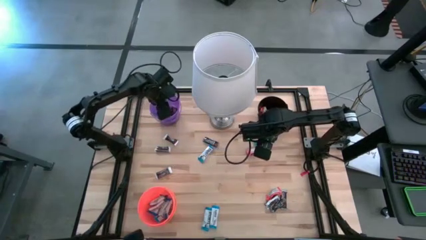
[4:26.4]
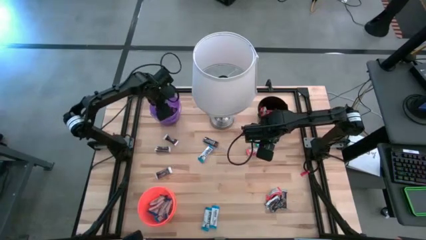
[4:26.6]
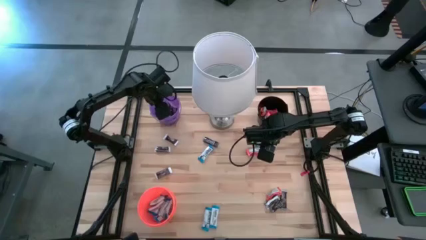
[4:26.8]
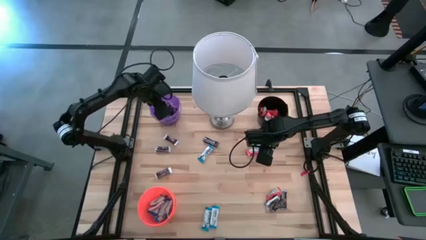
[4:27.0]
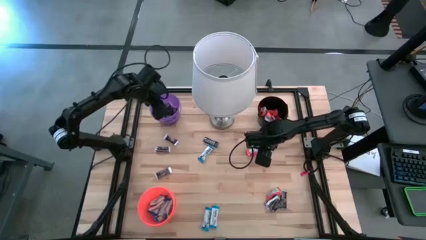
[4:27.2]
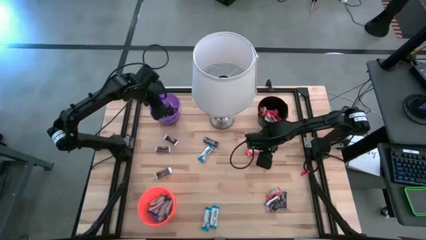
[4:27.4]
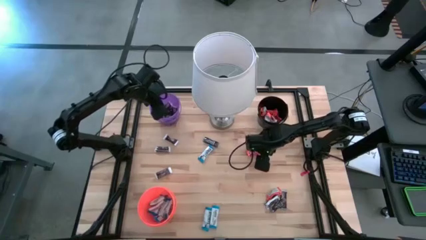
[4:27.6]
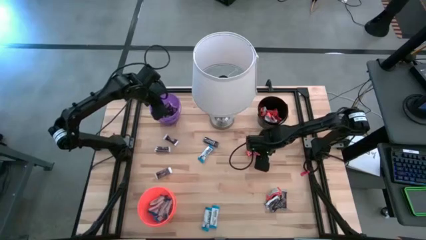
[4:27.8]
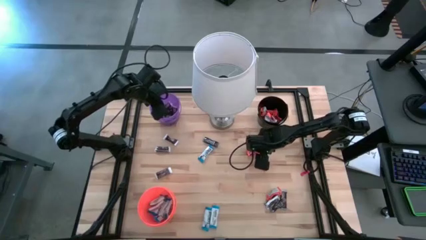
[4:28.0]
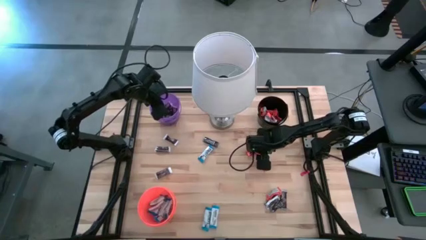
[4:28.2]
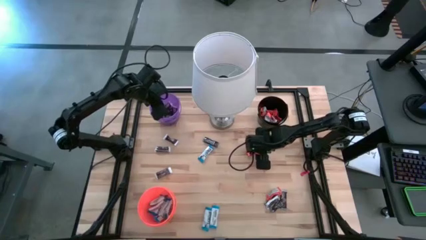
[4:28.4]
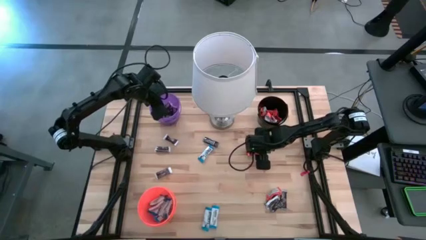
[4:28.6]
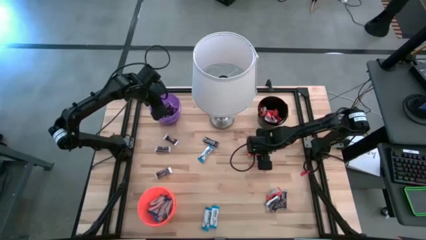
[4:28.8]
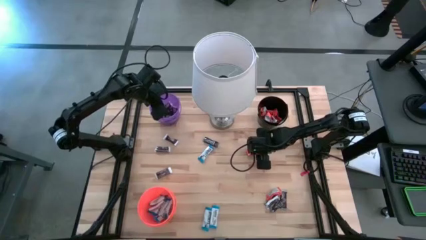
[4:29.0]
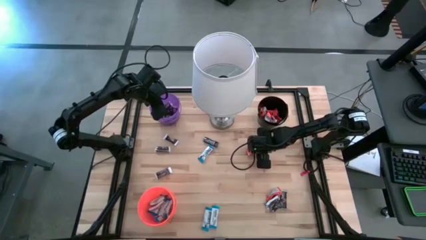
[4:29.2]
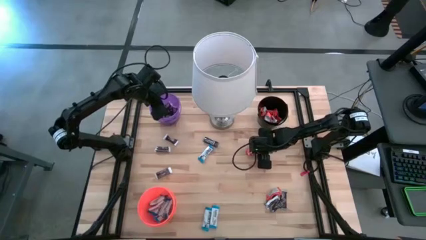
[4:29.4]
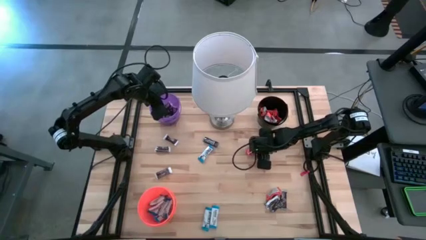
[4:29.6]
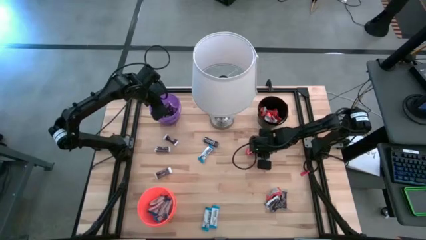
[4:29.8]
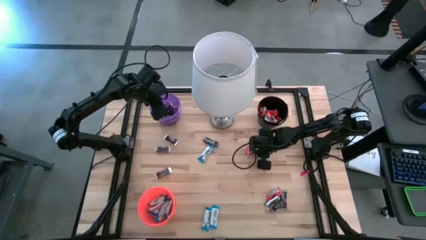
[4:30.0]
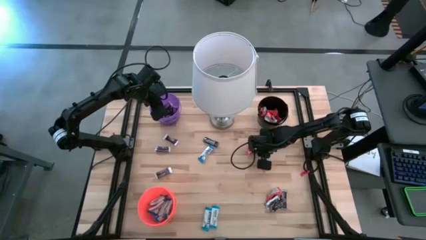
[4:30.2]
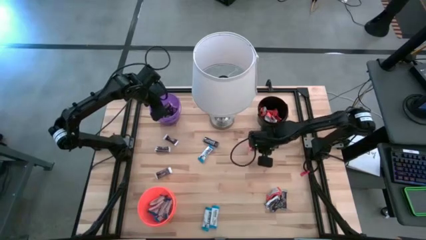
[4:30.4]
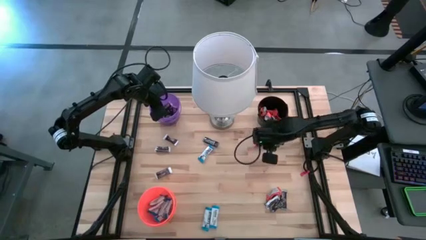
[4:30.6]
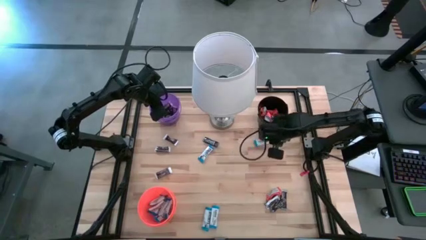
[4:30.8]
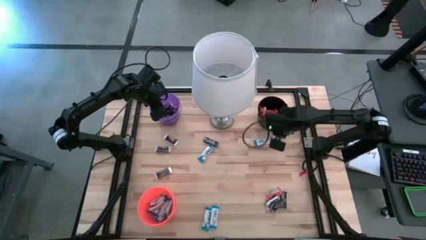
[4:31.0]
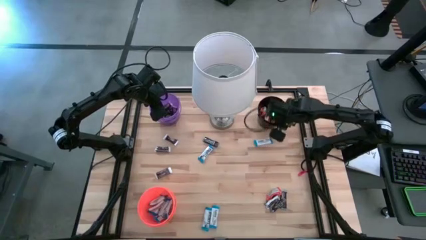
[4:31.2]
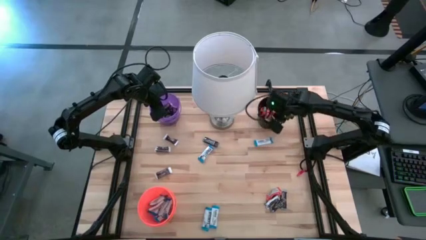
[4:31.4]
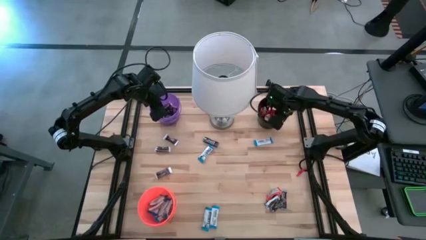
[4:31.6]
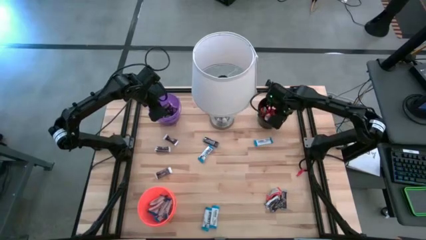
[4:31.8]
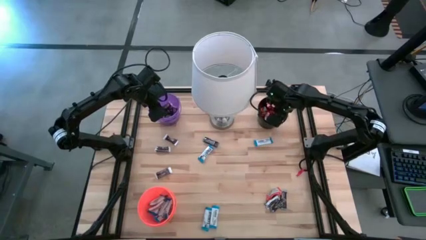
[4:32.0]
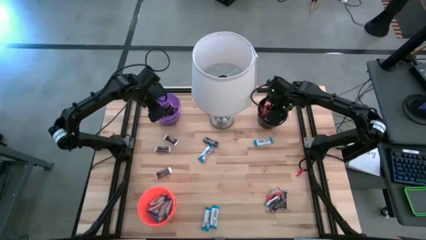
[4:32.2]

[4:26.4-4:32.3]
Task: Organize candy in baskets
Put the orange chocolate bar into the black bucket

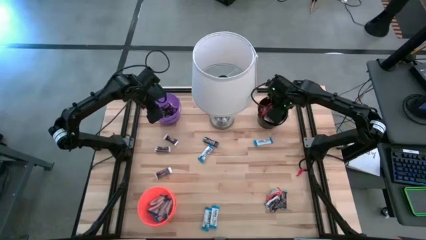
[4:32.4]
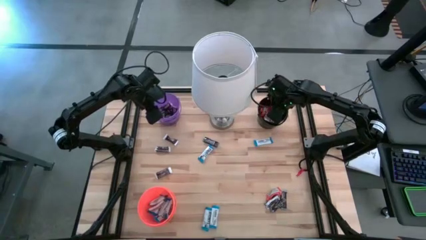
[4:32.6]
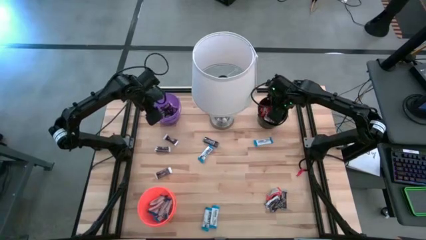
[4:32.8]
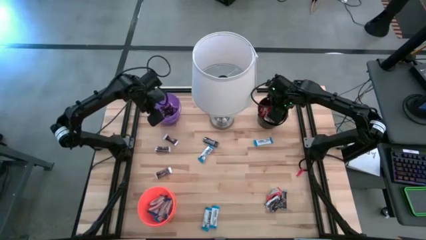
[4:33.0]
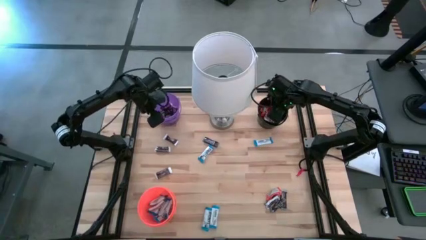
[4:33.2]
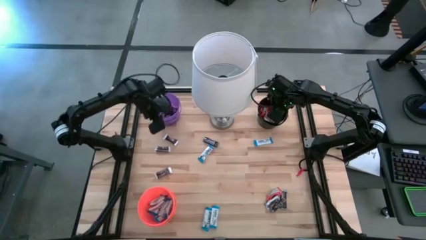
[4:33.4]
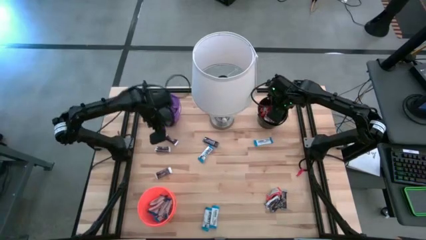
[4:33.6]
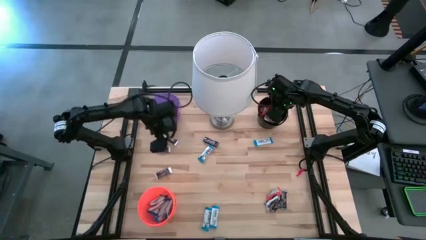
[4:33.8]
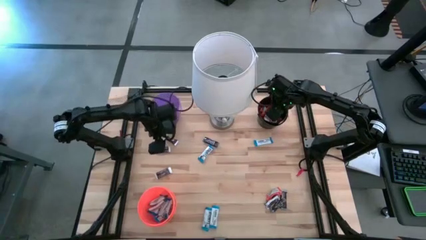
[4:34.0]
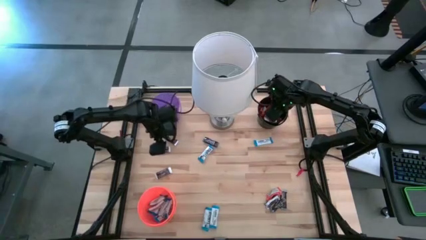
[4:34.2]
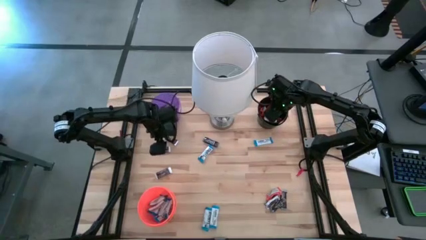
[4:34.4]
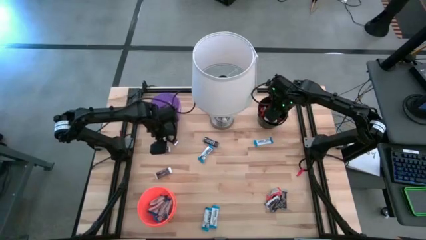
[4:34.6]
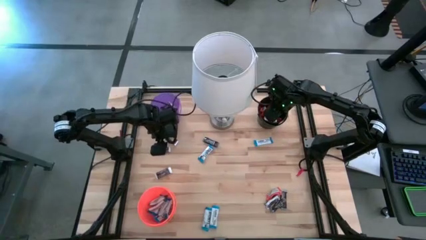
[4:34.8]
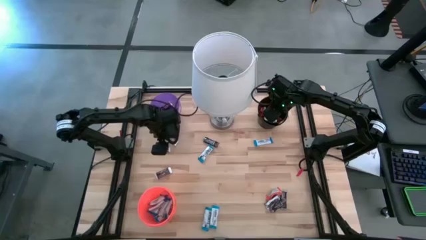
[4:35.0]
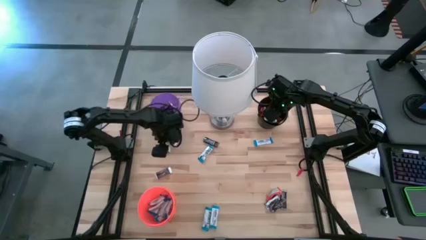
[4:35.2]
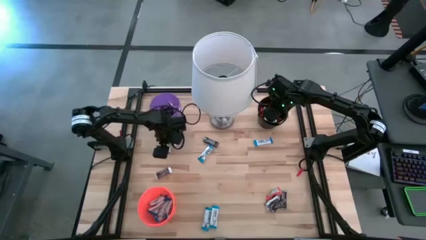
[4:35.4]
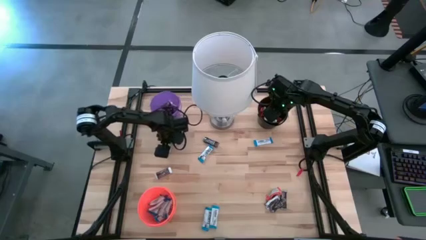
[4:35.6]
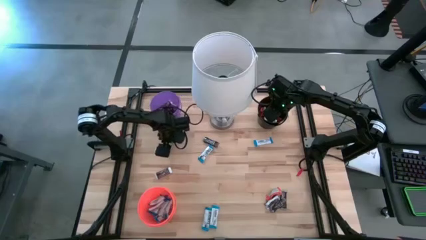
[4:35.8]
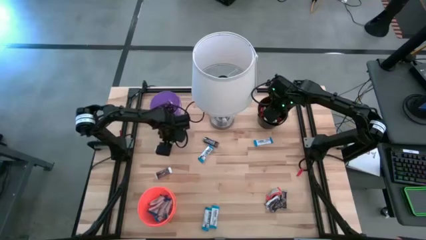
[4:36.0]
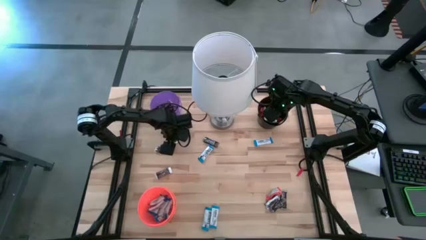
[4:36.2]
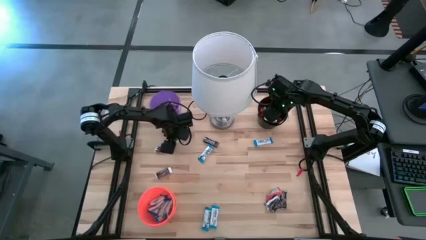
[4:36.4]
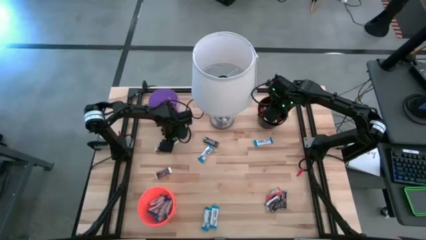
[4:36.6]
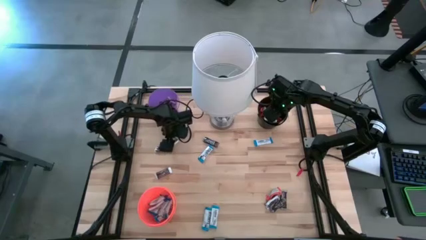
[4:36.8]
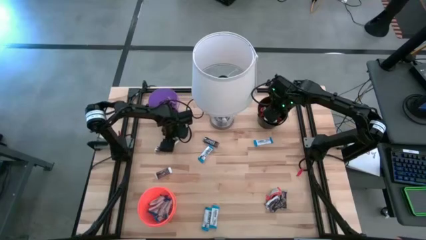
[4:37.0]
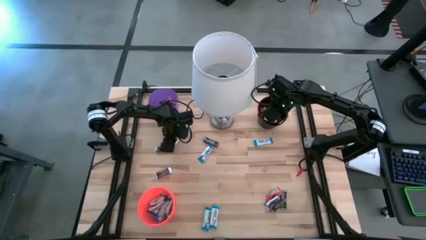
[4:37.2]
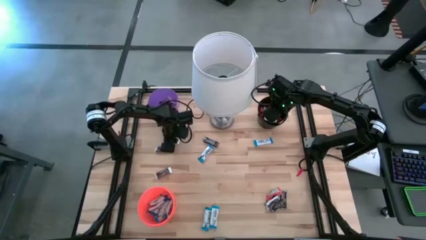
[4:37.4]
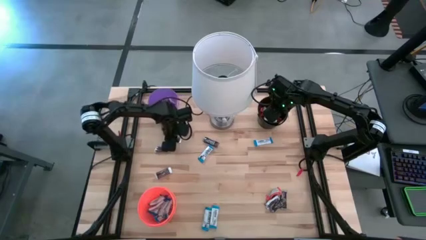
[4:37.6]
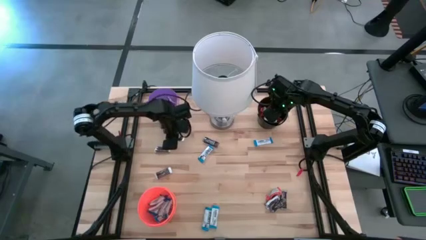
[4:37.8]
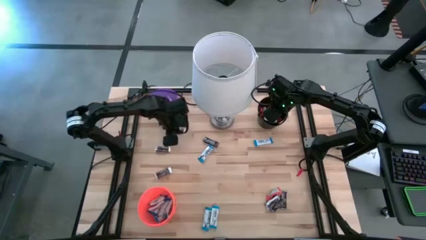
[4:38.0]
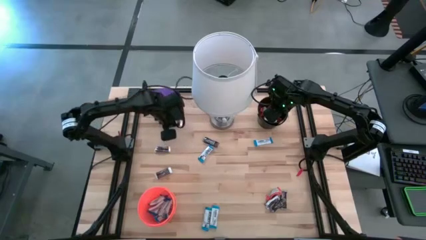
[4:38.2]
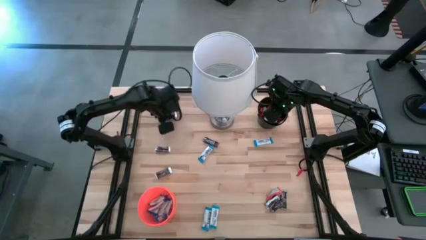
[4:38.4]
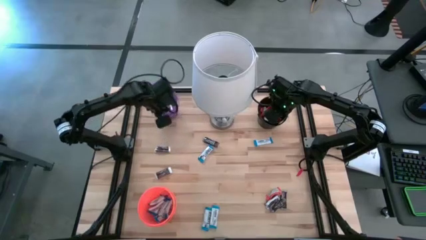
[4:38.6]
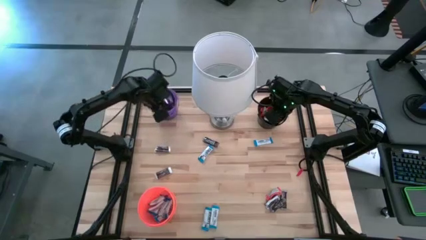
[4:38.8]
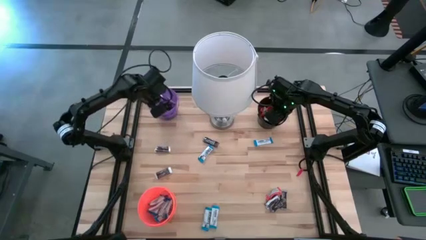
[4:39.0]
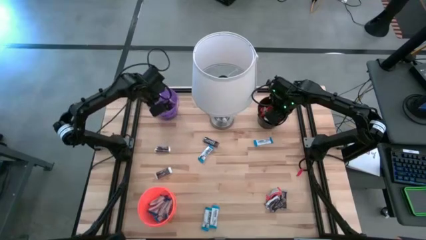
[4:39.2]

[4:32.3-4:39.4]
Put the brown chocolate bar into the purple bucket

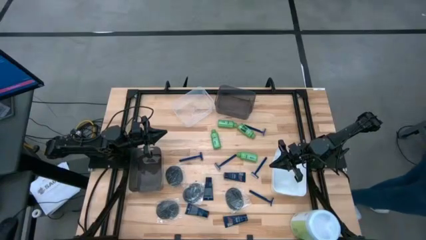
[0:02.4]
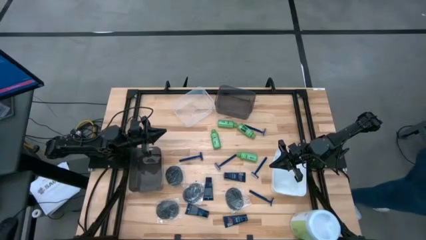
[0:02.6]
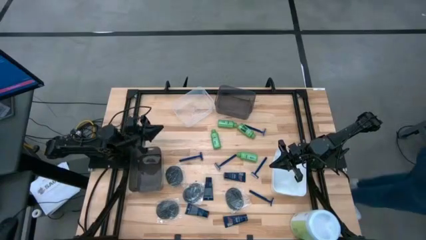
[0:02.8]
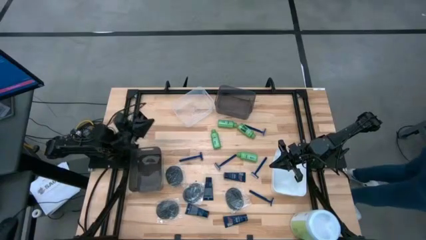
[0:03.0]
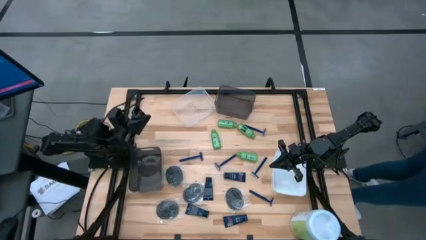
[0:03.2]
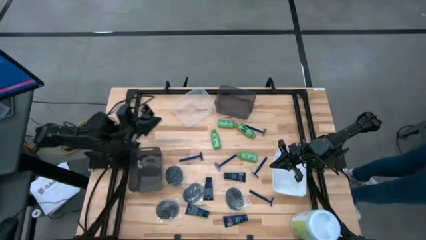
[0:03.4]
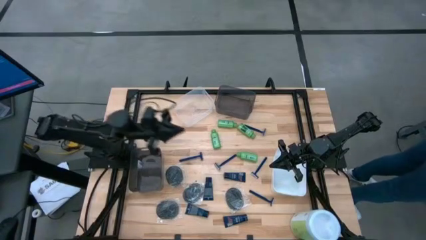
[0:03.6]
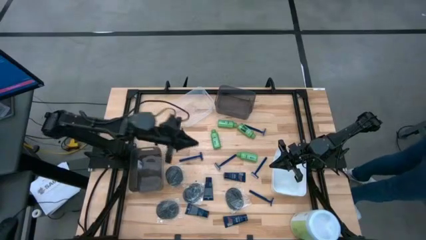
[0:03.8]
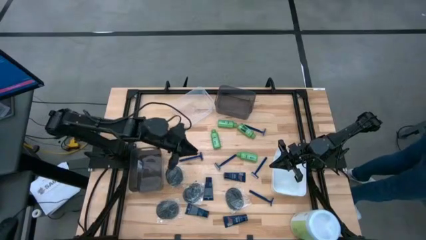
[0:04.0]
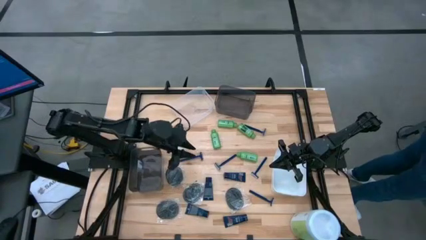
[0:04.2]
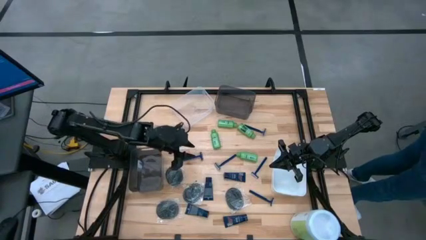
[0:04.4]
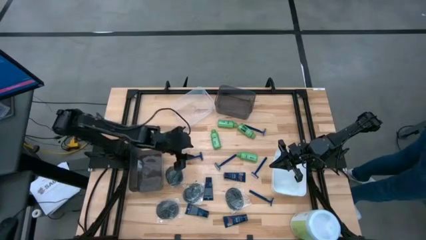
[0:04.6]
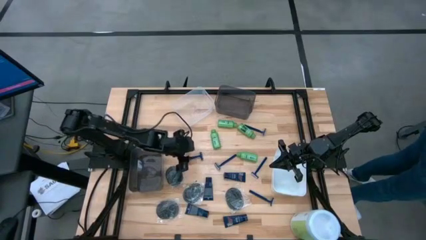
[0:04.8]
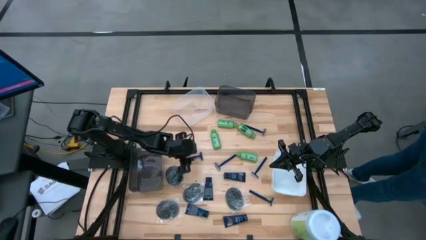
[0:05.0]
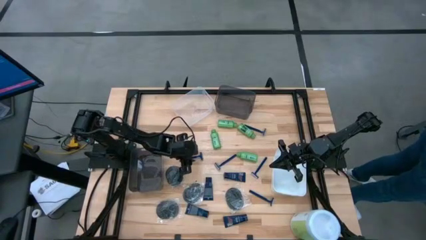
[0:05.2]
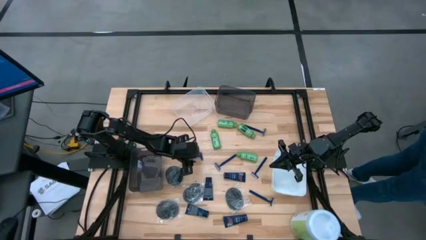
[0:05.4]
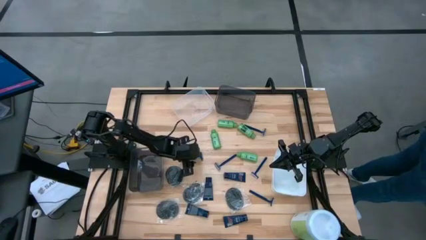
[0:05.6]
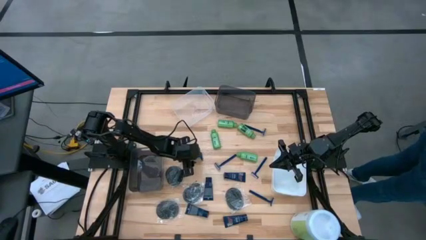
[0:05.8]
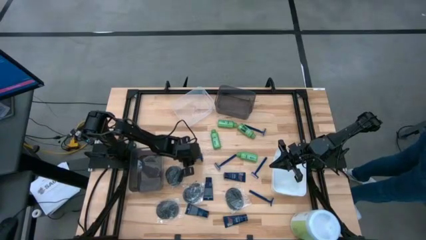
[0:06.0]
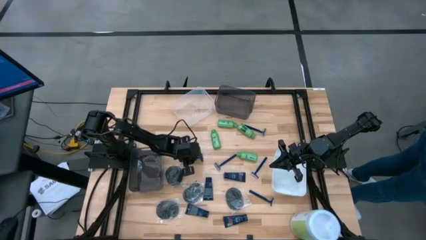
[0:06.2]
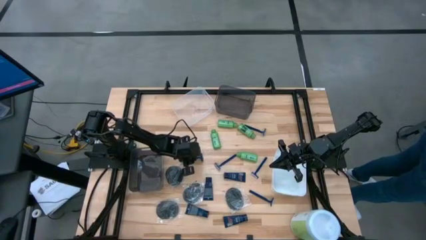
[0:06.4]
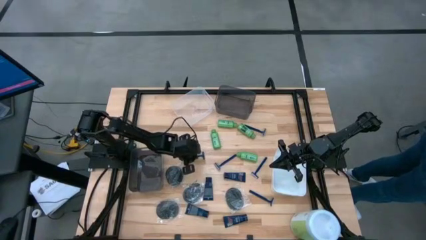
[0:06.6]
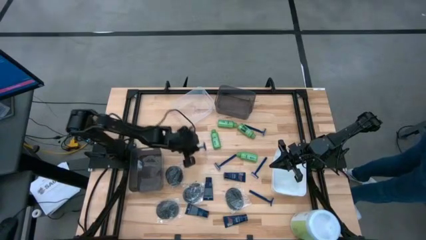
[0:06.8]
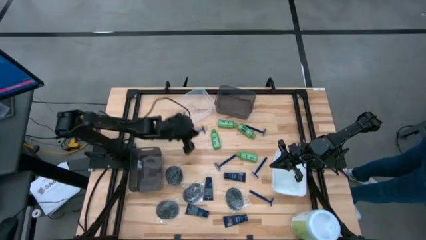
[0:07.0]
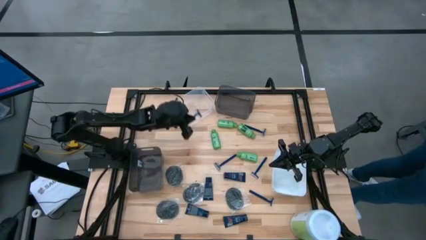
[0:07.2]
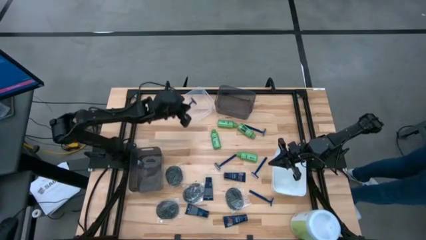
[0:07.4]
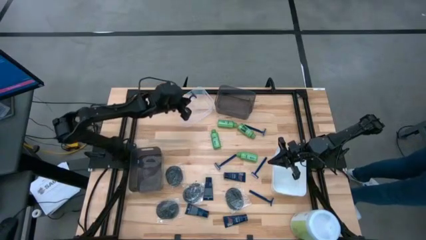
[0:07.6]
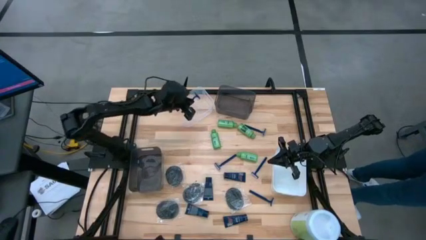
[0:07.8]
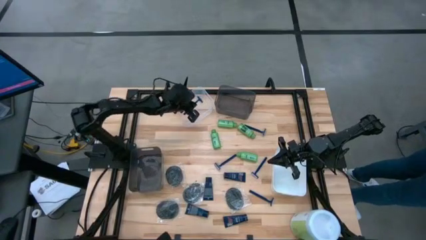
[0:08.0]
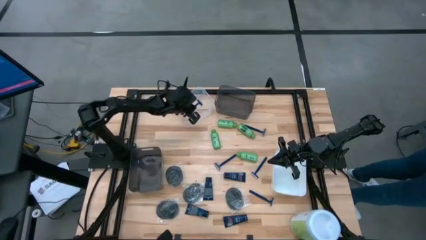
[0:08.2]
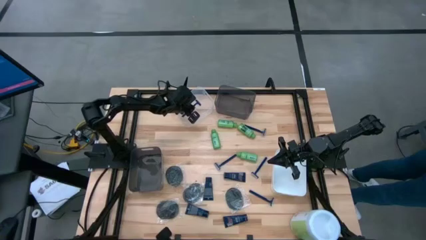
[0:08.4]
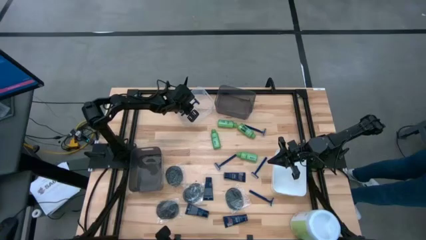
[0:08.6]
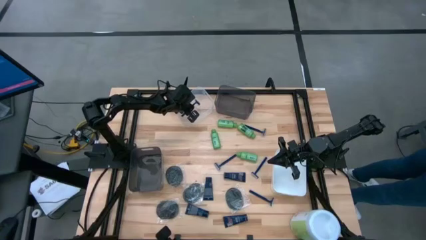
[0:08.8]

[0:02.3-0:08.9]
Task: Pick & Place Travel size toiletries
Put the blue razor into the white transparent bin
